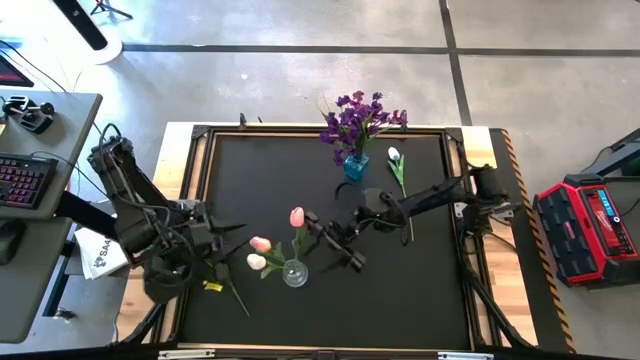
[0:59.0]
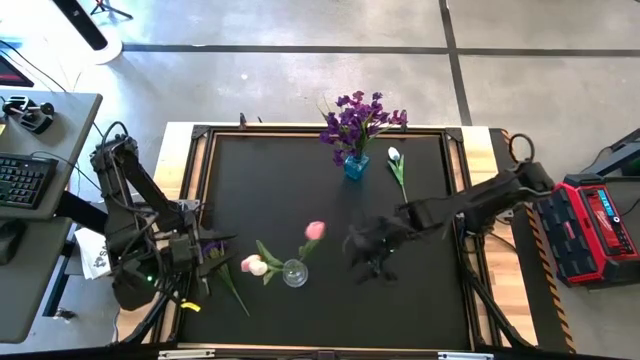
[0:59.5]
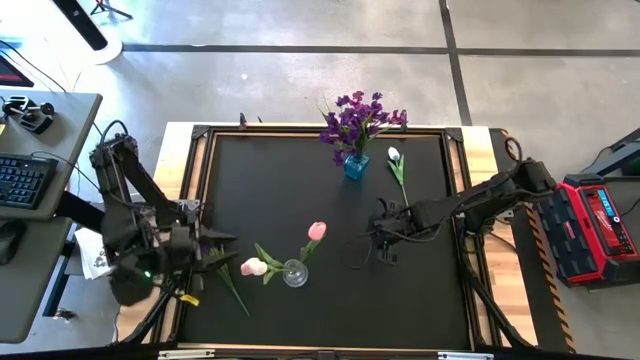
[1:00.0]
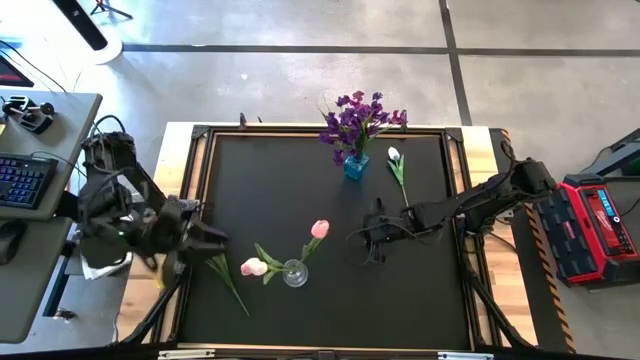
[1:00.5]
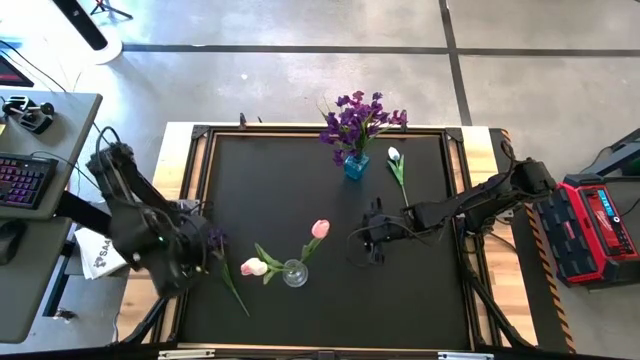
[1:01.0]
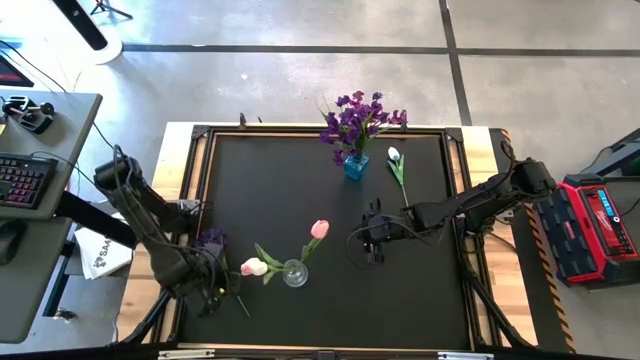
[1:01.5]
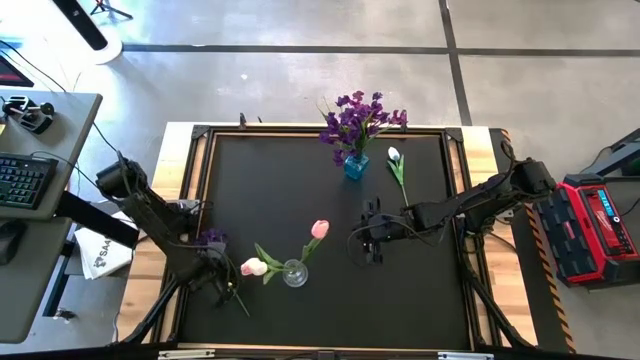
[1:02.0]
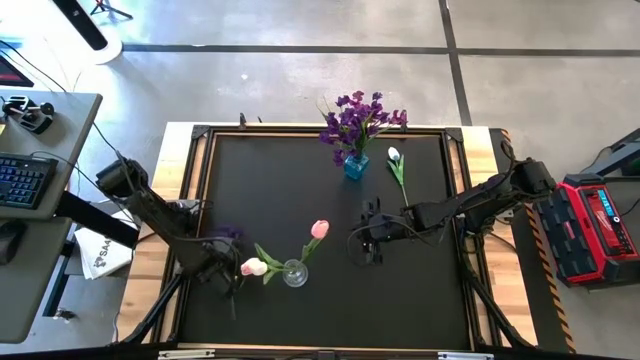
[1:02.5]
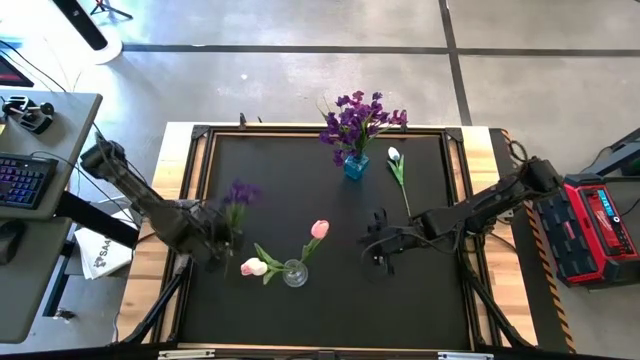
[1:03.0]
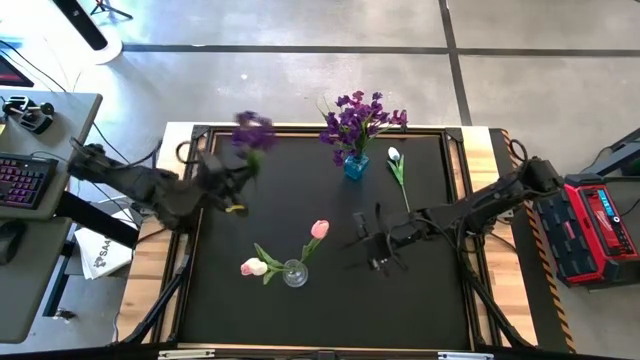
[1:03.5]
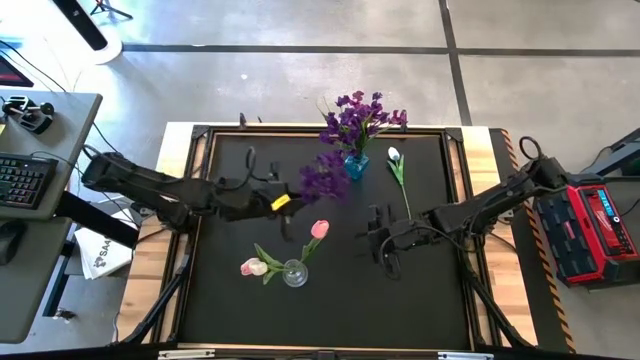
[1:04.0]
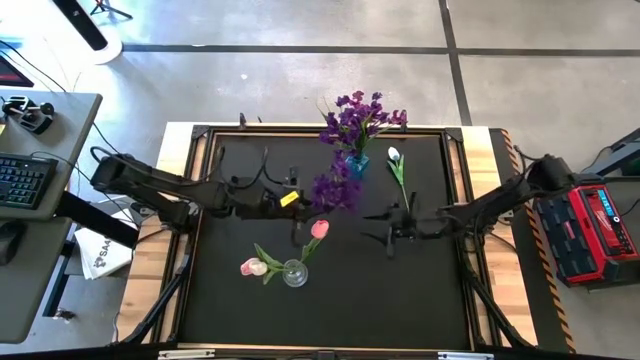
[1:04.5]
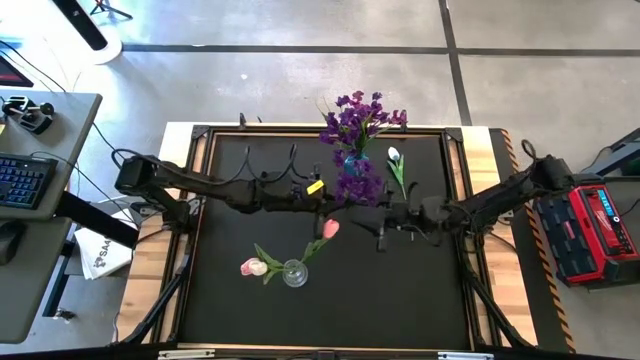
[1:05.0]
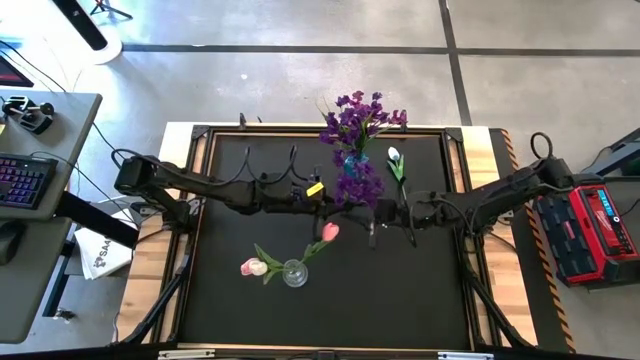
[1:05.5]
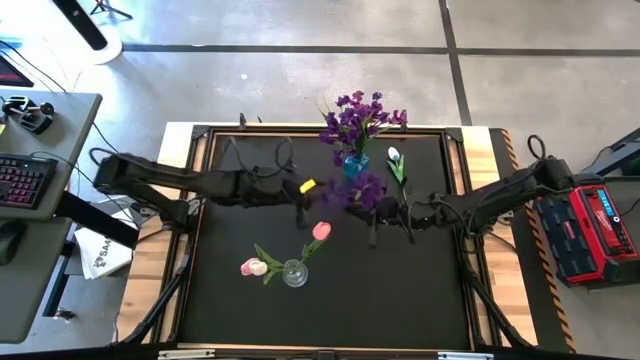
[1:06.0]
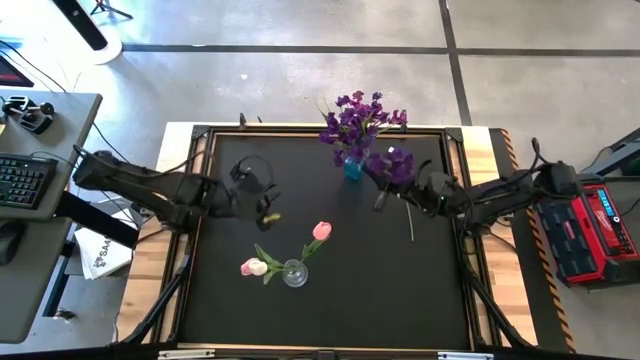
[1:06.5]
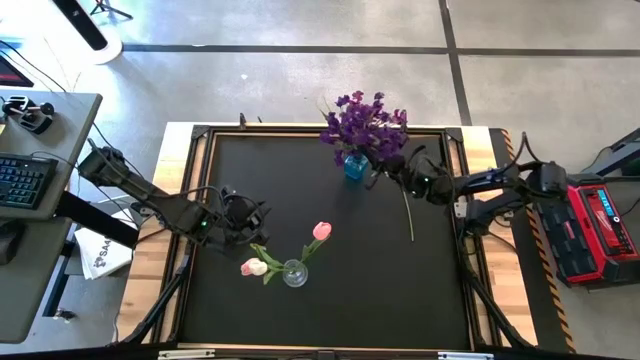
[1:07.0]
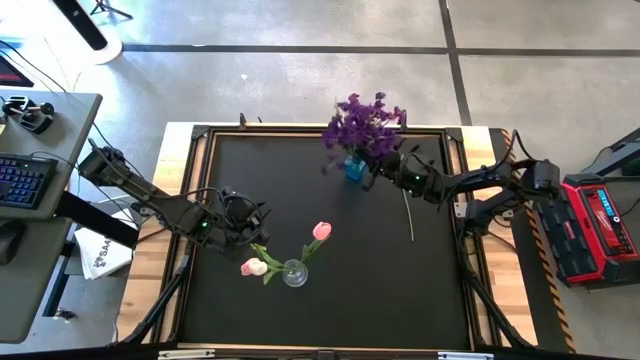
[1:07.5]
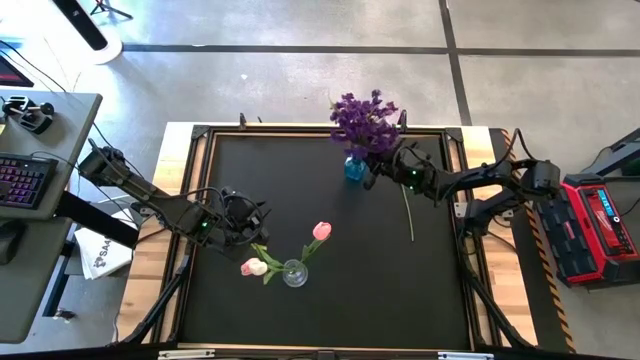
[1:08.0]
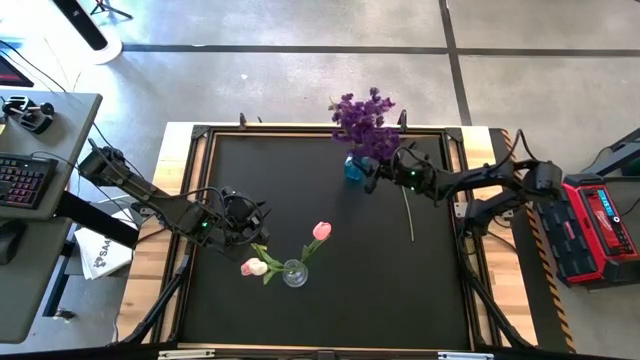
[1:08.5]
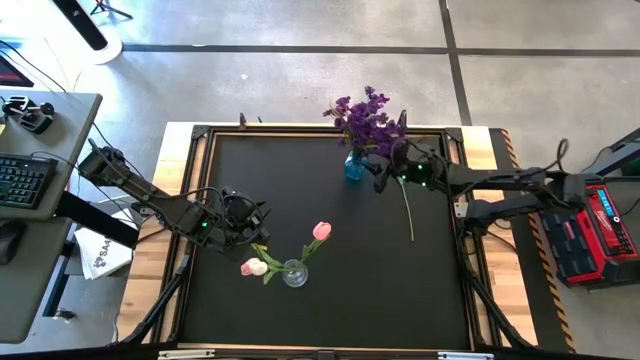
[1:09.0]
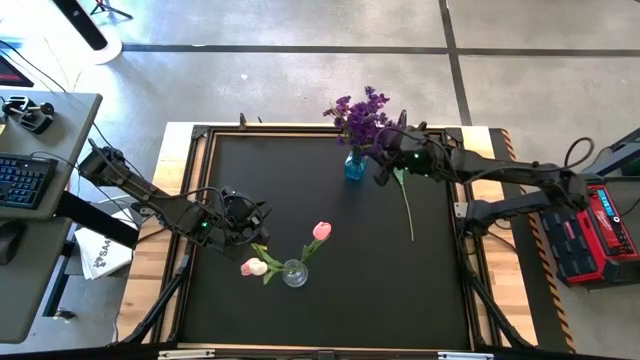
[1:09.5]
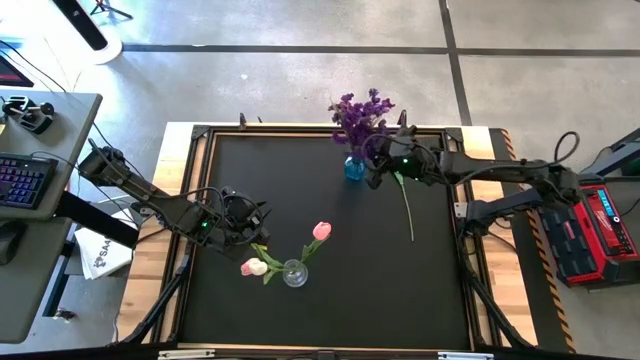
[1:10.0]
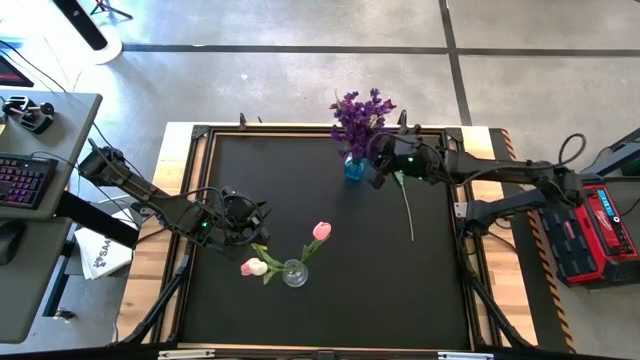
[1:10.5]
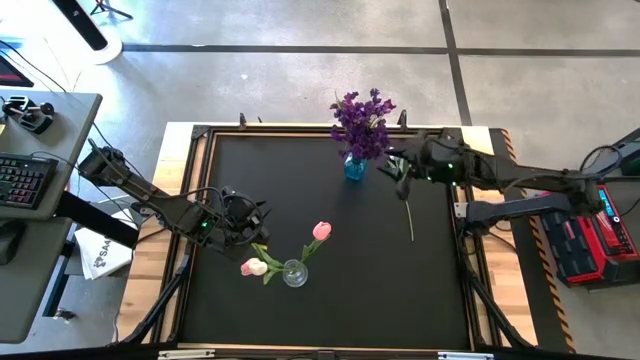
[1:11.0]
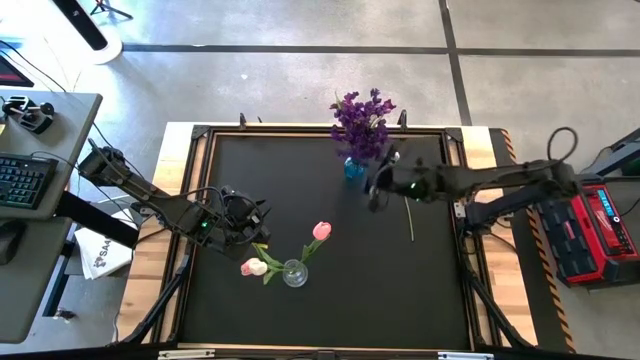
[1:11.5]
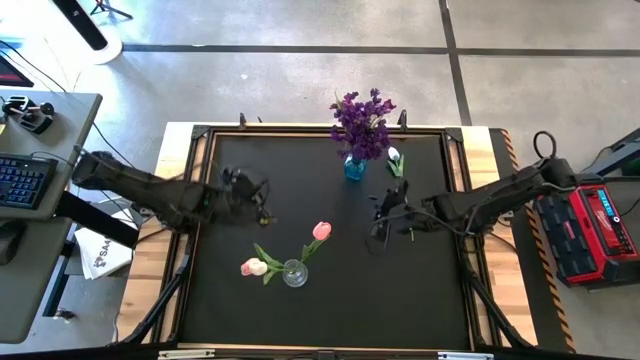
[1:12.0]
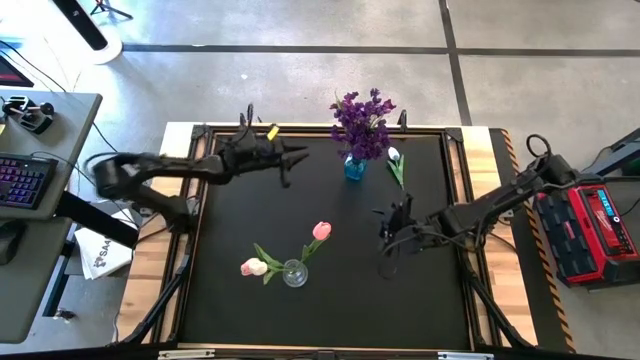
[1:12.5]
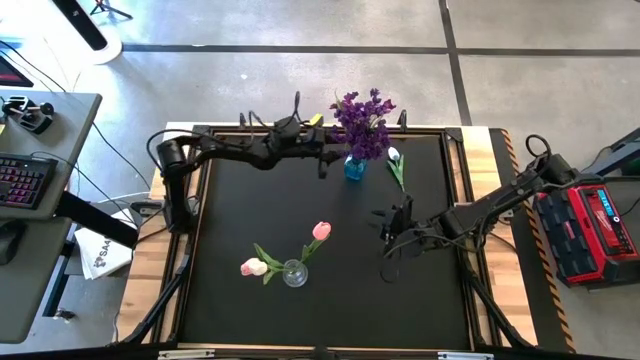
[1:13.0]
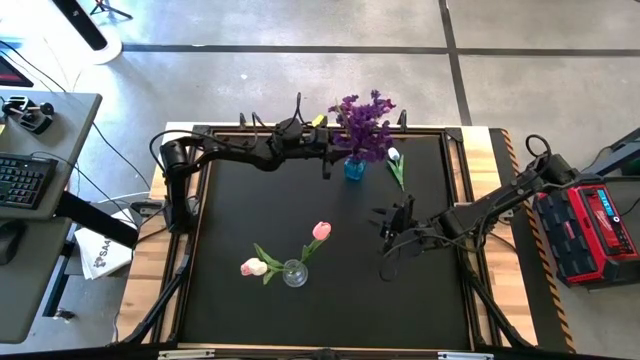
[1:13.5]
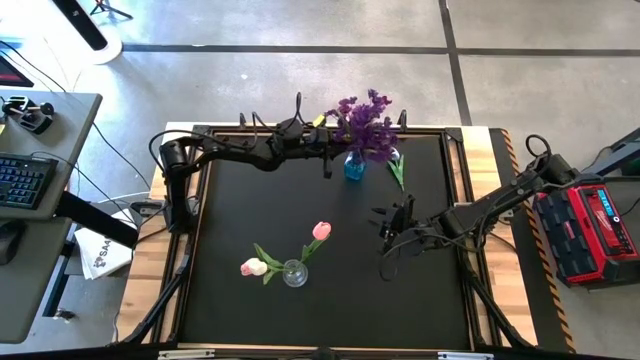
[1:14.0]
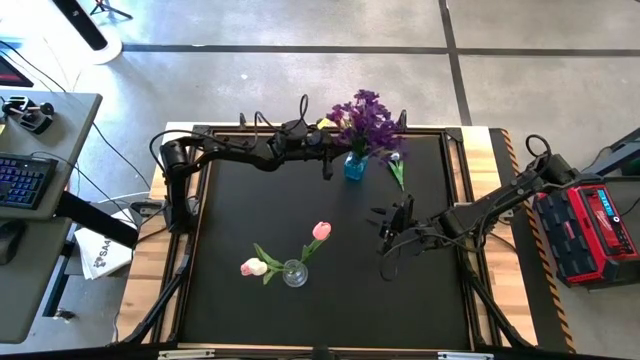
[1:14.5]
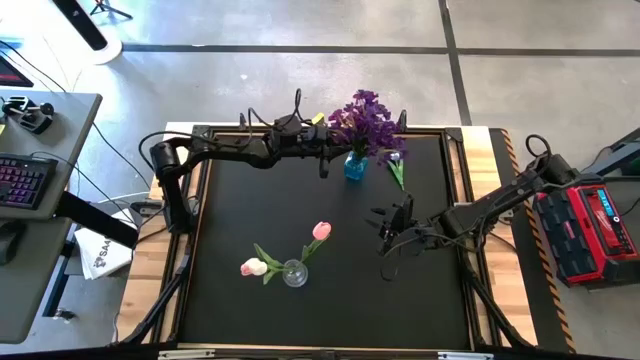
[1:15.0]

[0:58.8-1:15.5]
Task: Sort flowers into vase by color
Put the dark violet flower into the blue vase

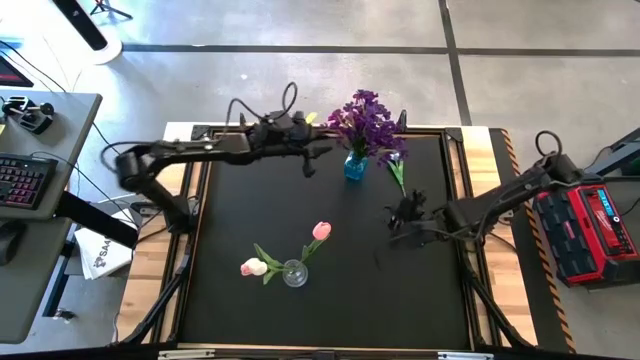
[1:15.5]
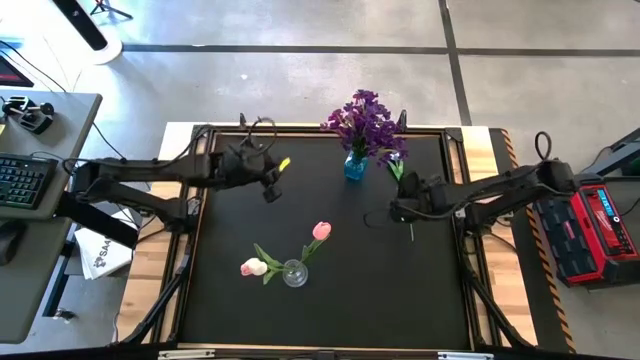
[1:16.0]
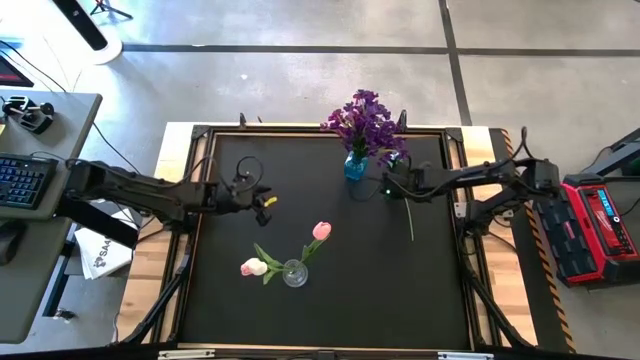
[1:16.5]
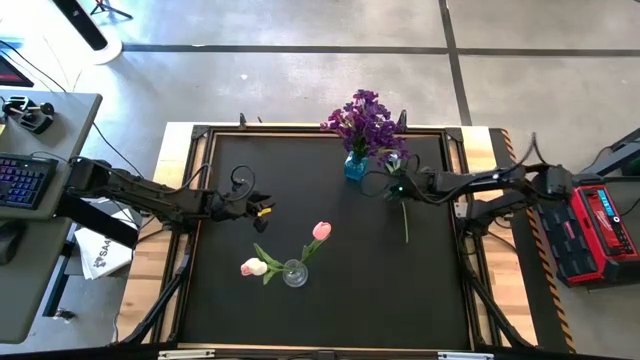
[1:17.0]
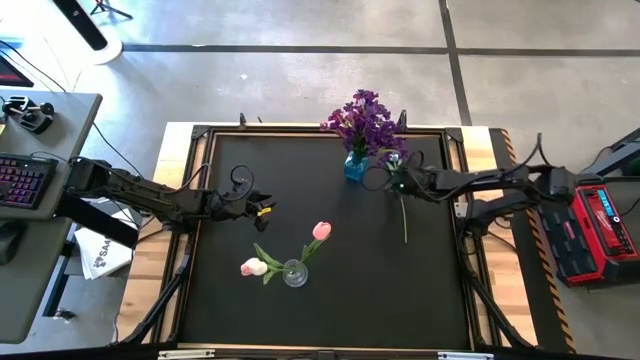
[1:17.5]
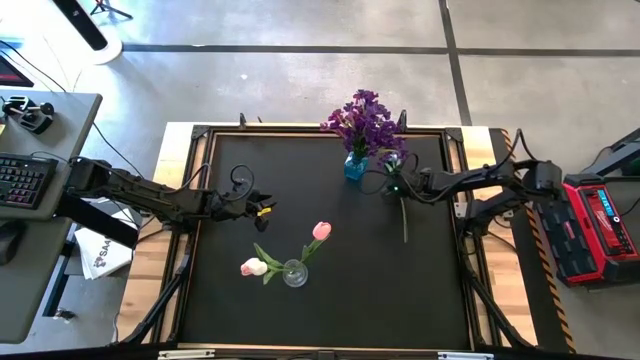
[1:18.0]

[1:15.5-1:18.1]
Put the white flower into the transparent vase

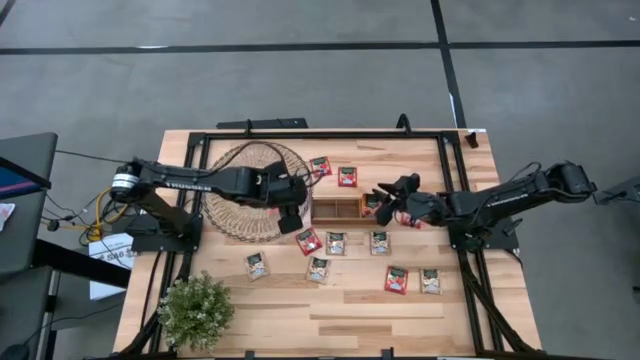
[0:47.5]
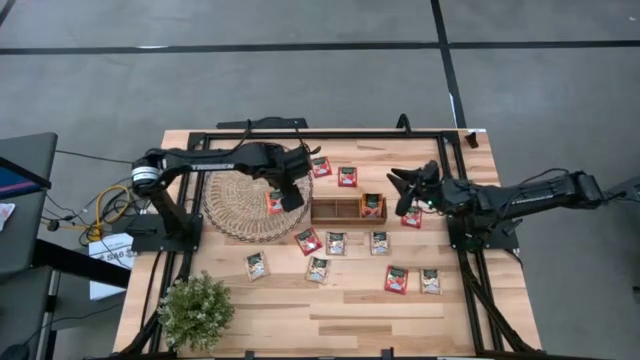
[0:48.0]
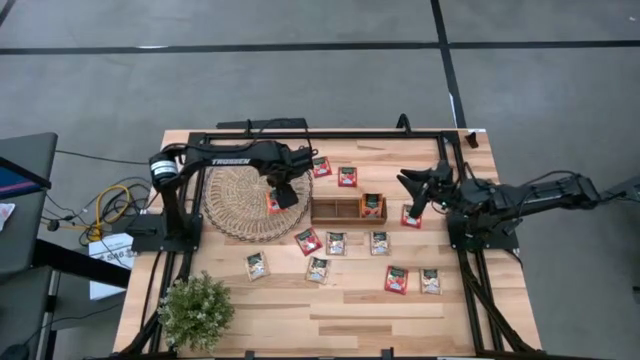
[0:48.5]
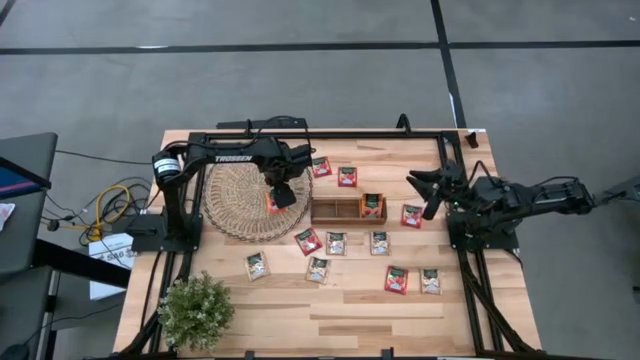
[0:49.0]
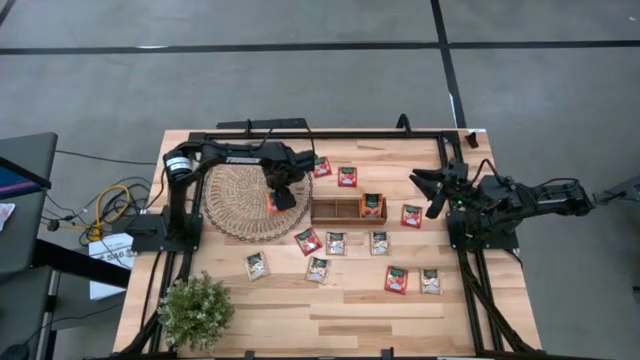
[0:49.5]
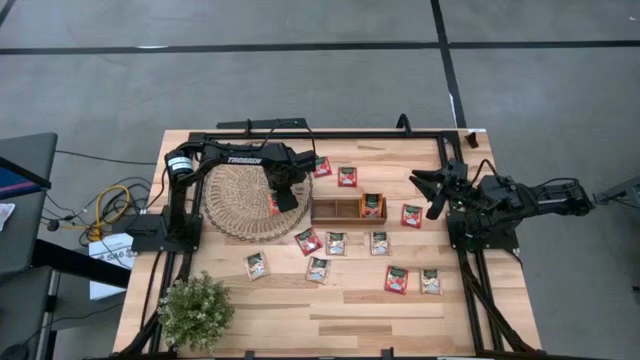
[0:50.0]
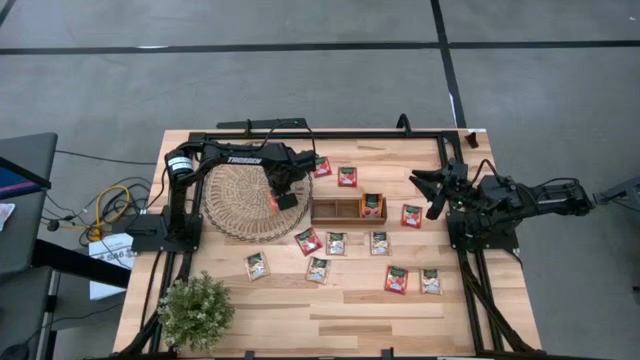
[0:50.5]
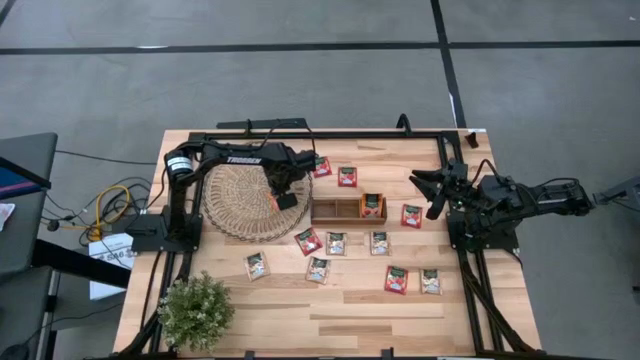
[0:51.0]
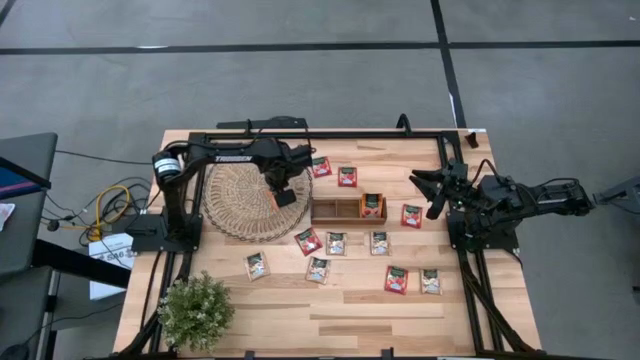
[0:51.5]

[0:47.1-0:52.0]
Task: Pick & Place Tea
Put the orange tea bag into the right section of the wooden organizer
